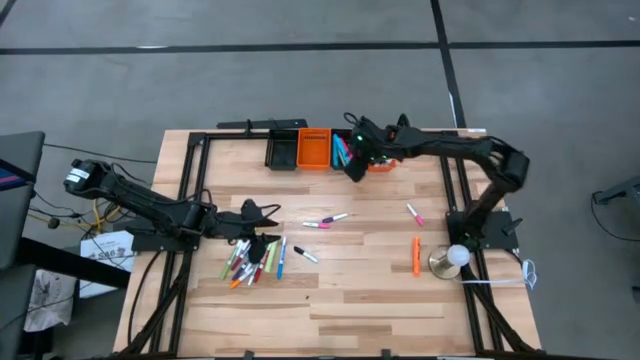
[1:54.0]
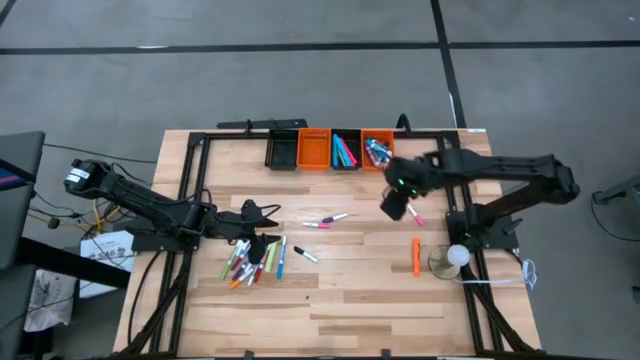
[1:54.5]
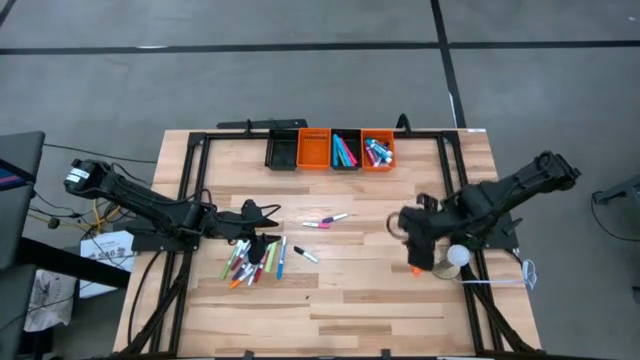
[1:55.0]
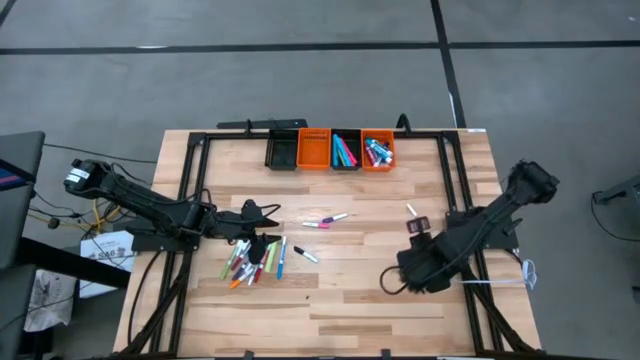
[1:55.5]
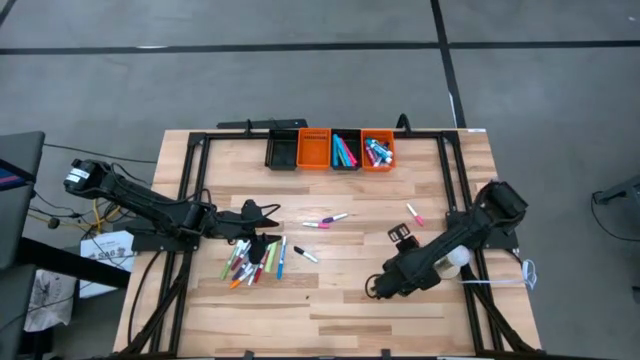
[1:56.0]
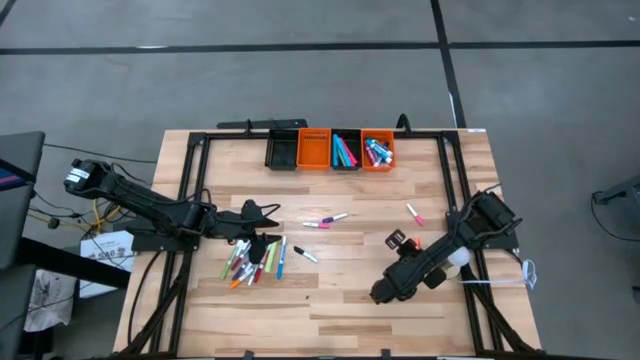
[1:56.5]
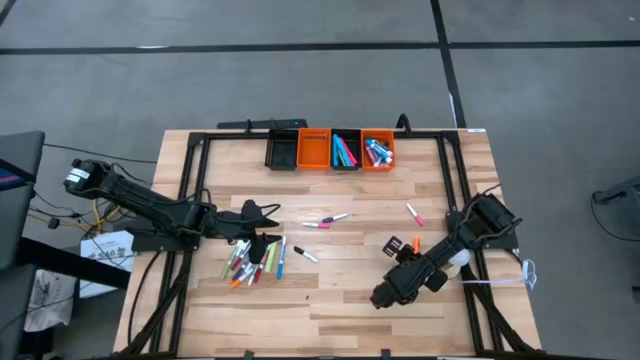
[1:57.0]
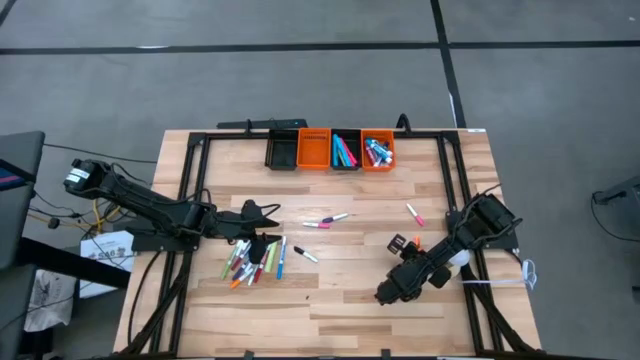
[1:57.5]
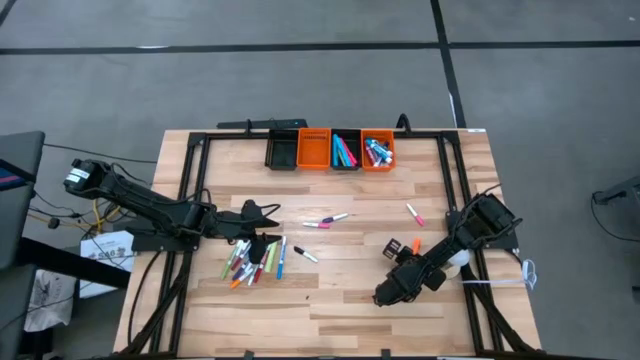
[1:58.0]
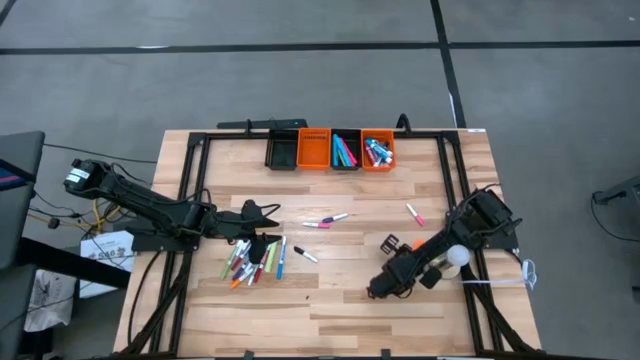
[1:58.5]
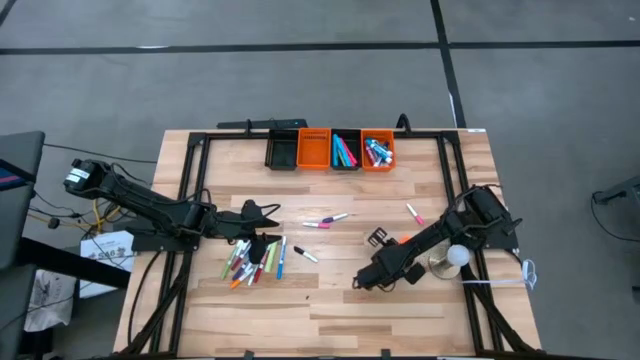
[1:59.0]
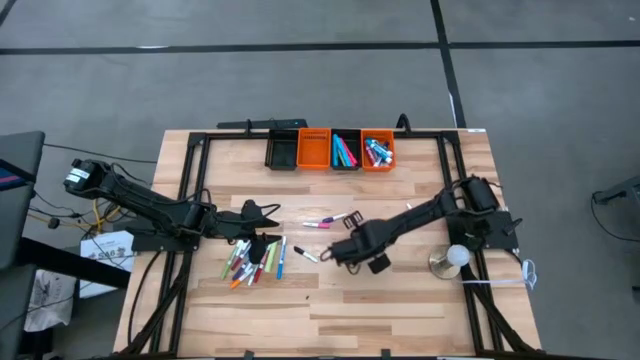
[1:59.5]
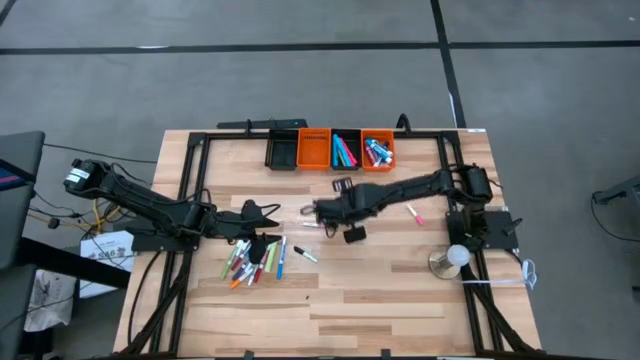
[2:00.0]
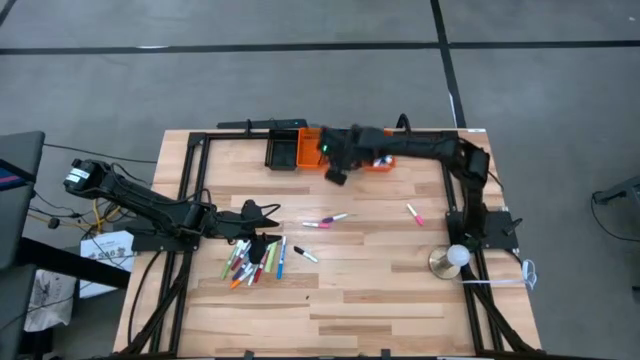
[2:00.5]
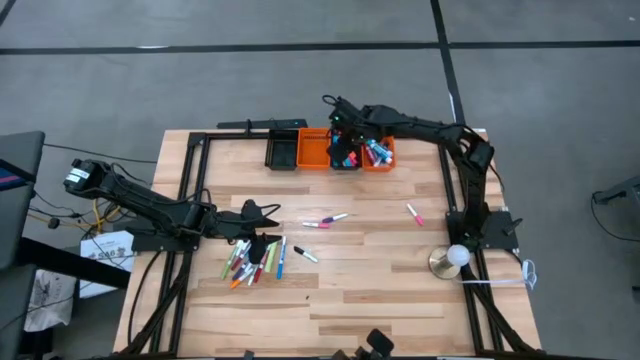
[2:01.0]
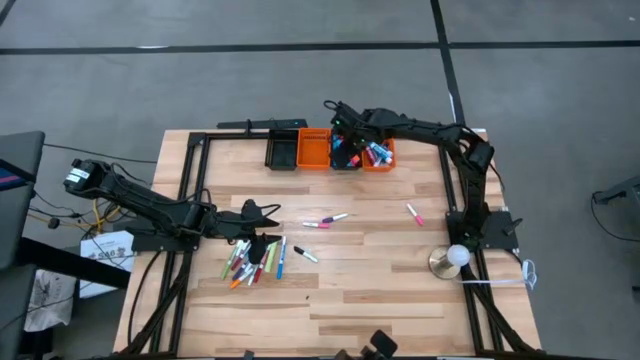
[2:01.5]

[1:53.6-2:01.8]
Task: Pick & Place Markers
Put the orange highlighter pen into the right black bin

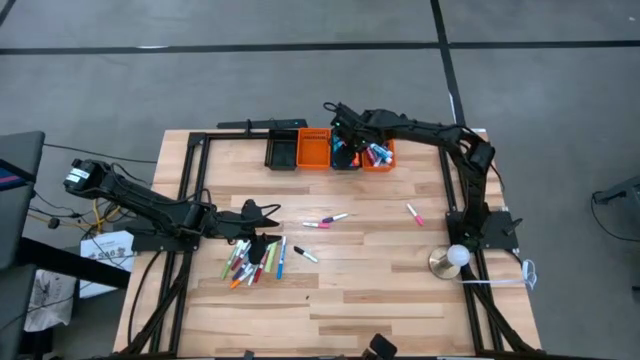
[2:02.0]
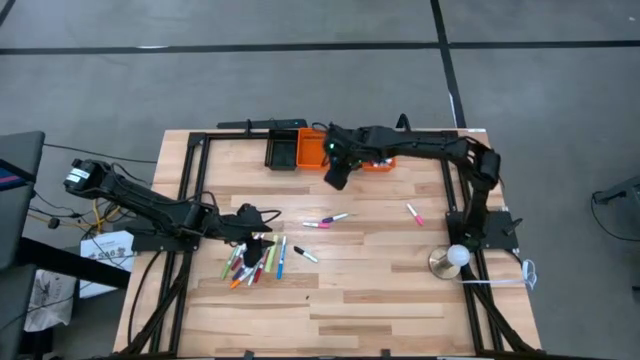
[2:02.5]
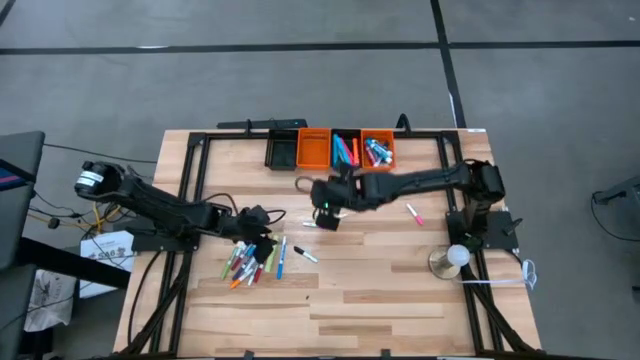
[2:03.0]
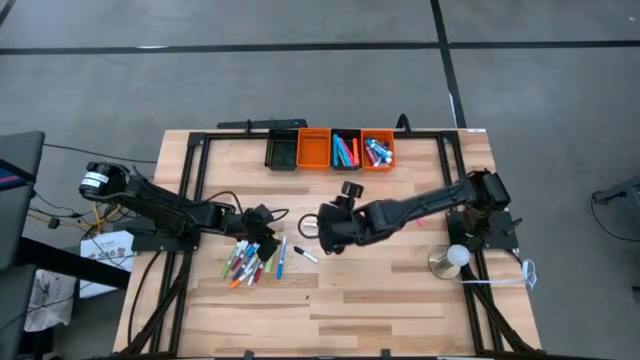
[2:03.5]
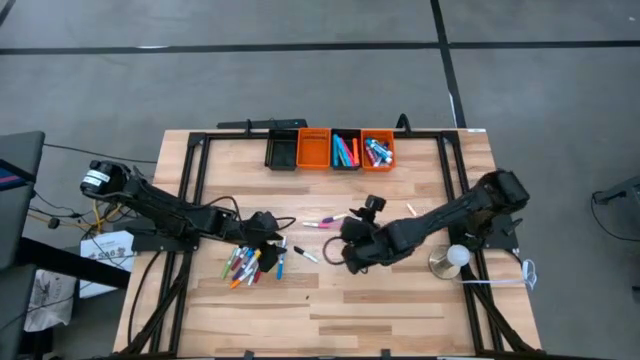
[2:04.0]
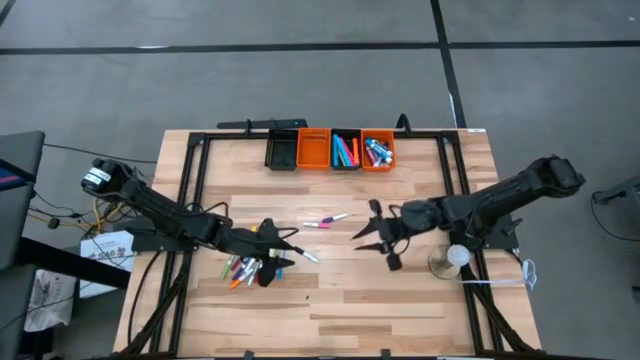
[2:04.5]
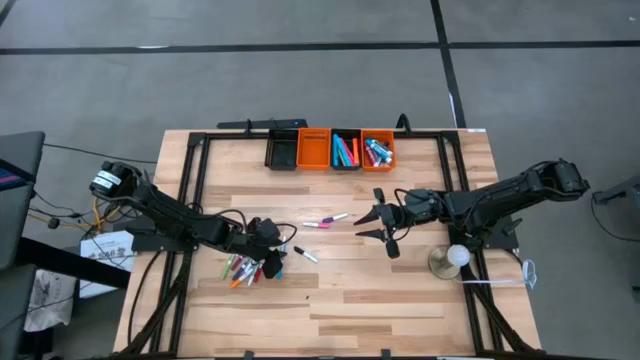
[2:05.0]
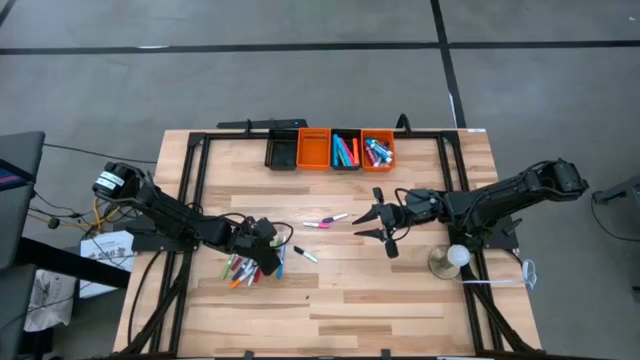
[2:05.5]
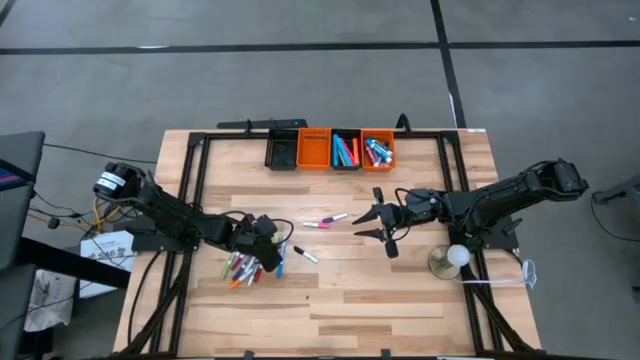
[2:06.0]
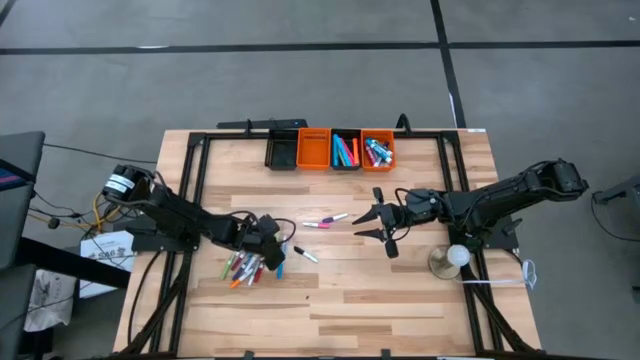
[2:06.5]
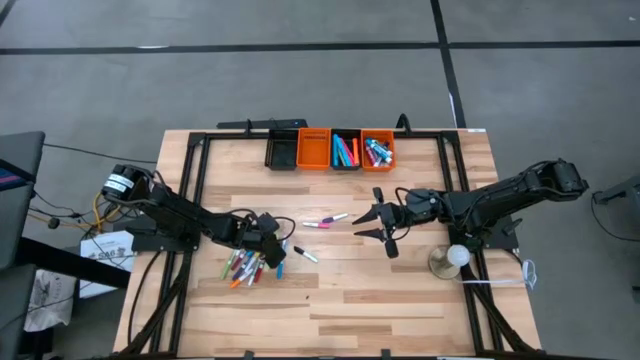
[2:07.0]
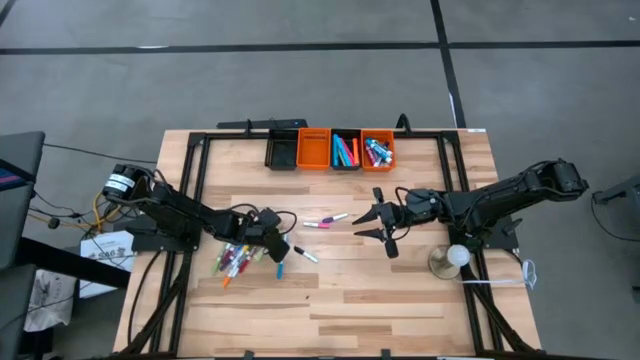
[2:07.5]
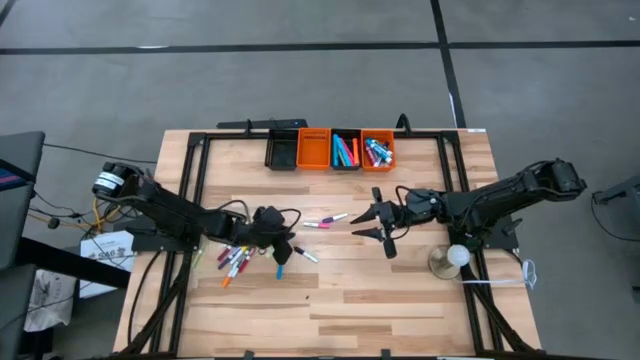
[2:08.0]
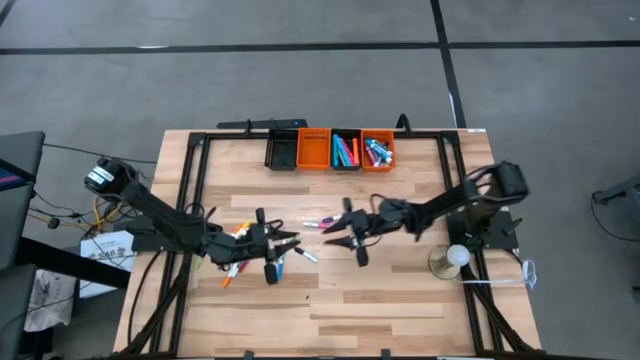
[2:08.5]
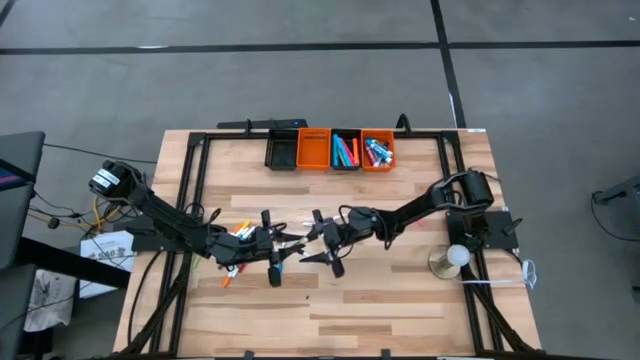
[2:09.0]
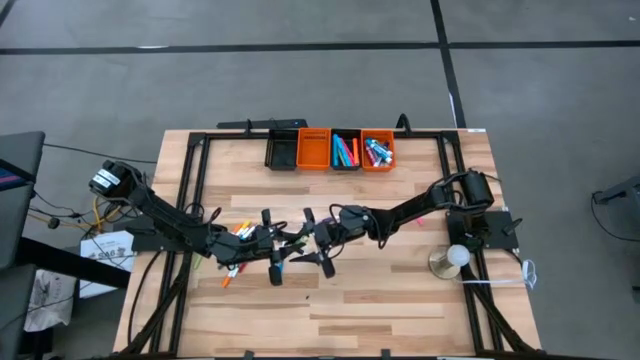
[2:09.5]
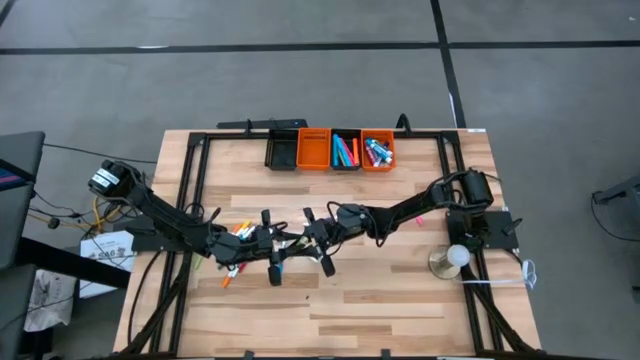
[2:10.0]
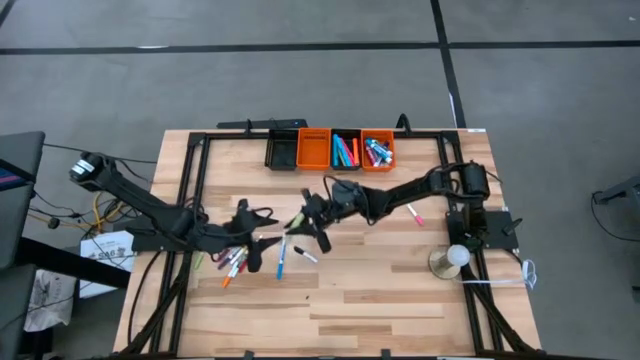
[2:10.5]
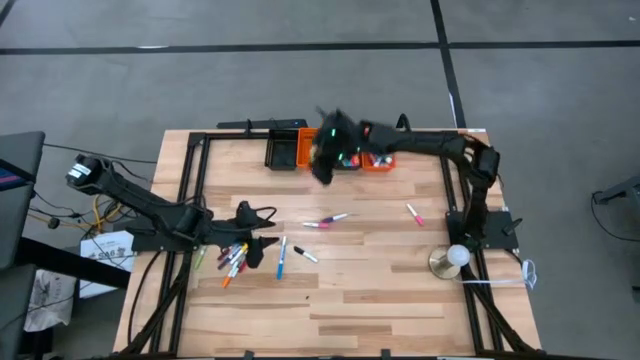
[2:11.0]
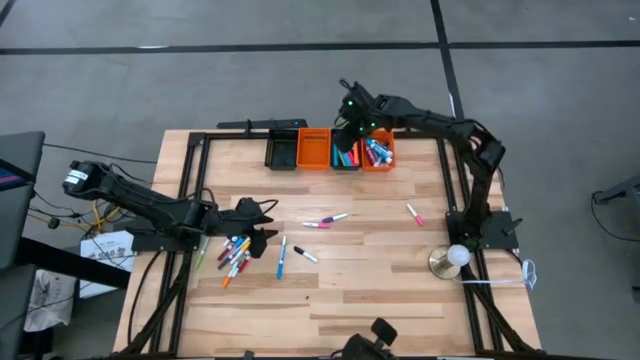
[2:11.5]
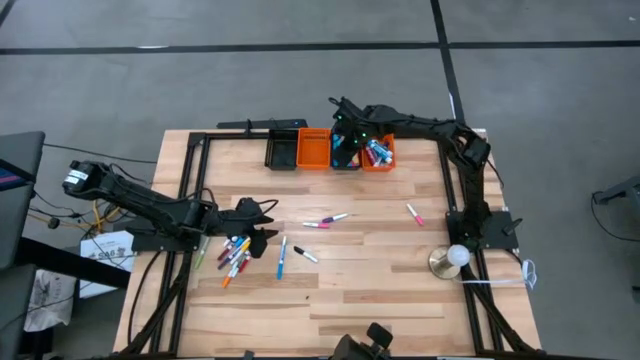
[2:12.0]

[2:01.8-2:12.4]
Put the light green highlighter pen into the right black bin

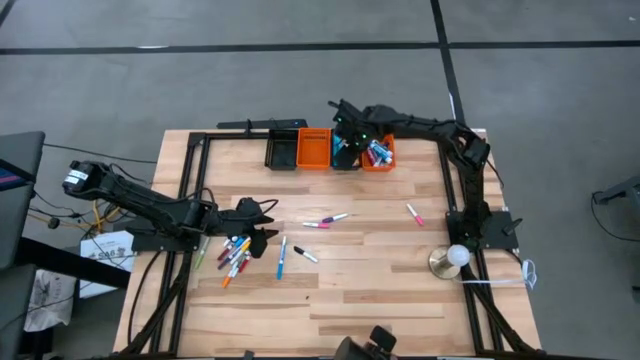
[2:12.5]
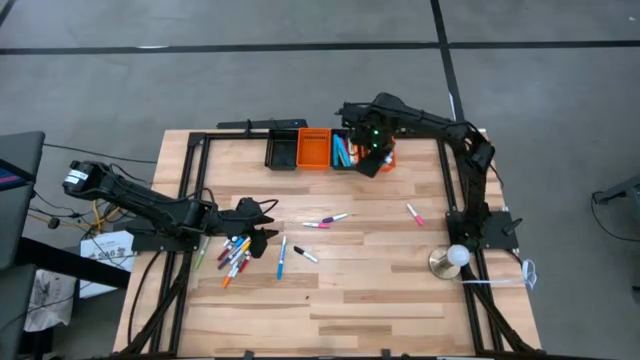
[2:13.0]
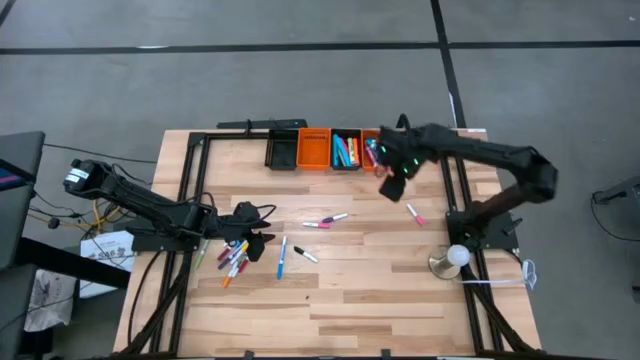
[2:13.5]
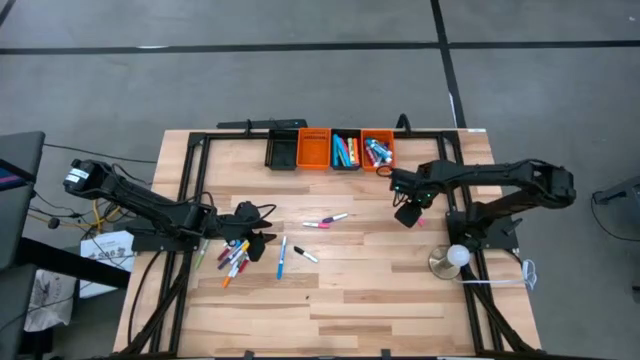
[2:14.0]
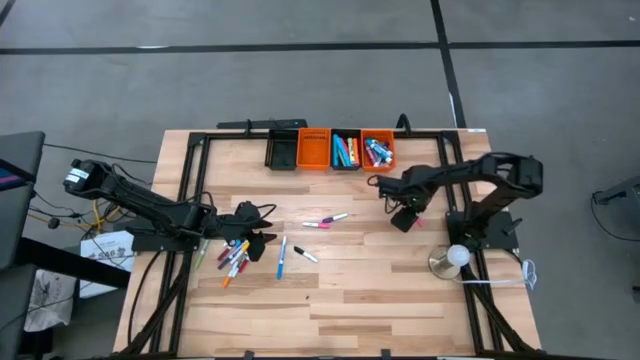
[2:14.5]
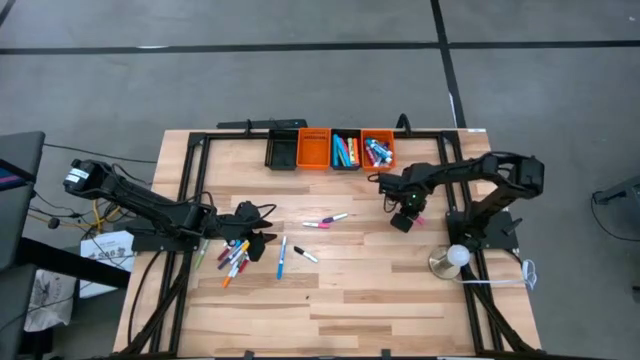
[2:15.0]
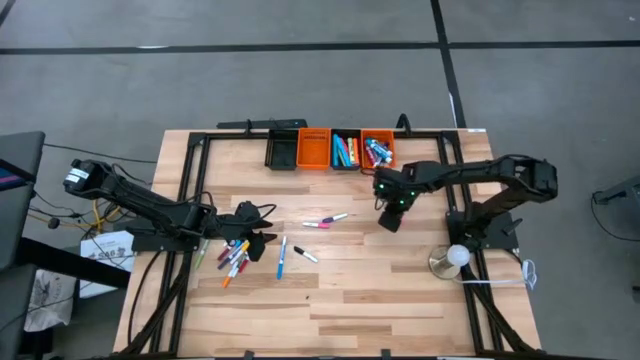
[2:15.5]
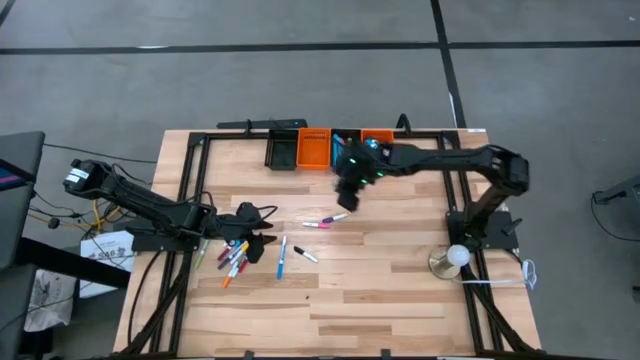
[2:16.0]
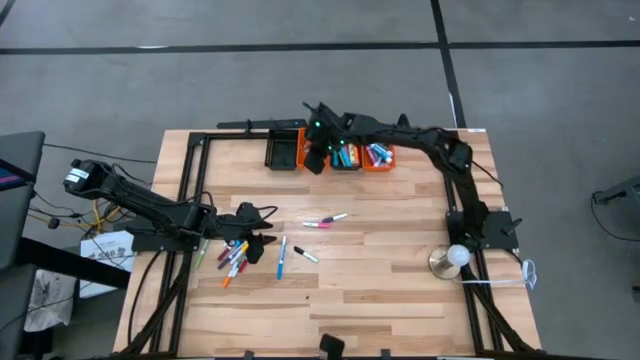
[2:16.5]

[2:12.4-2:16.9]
Put the white pink highlighter pen into the left orange bin
